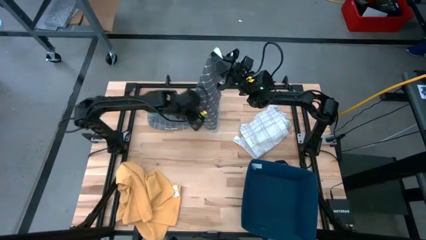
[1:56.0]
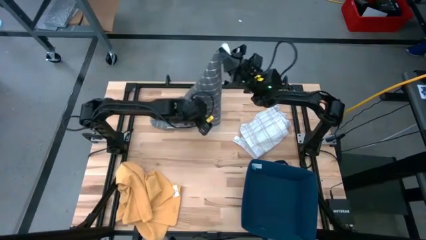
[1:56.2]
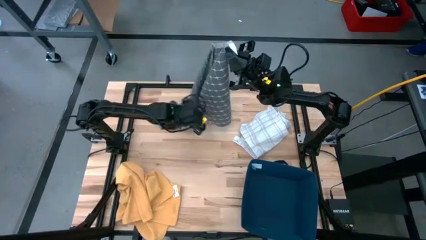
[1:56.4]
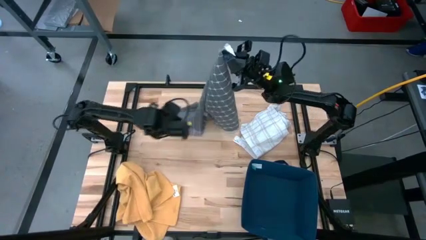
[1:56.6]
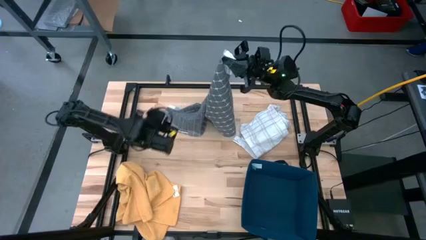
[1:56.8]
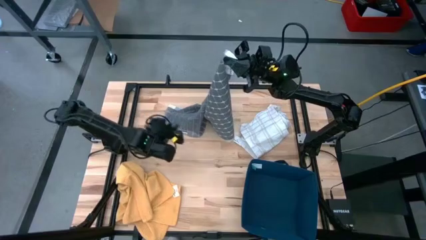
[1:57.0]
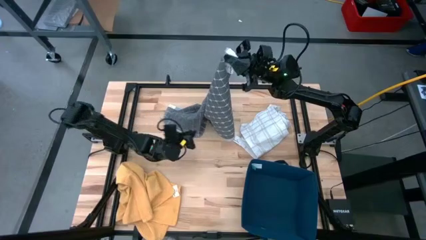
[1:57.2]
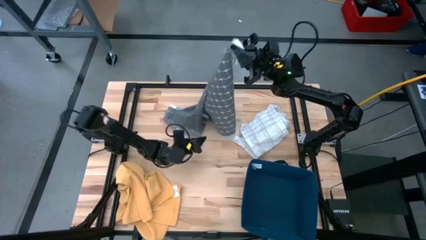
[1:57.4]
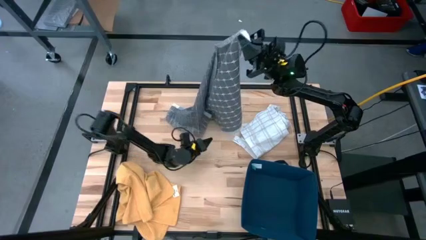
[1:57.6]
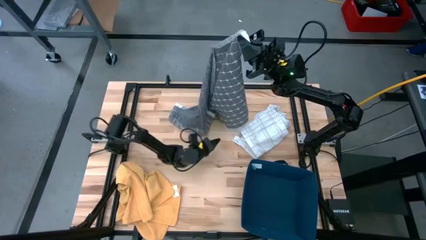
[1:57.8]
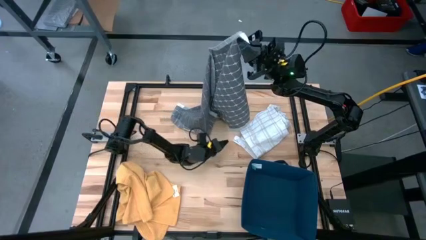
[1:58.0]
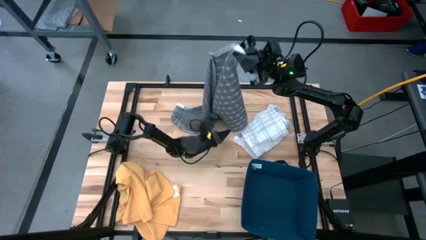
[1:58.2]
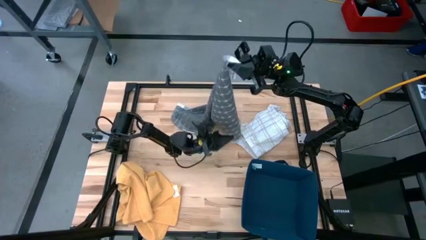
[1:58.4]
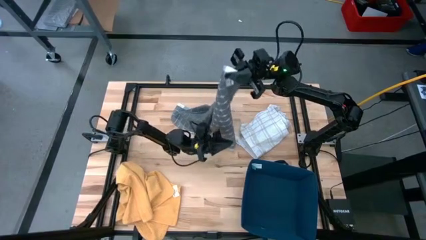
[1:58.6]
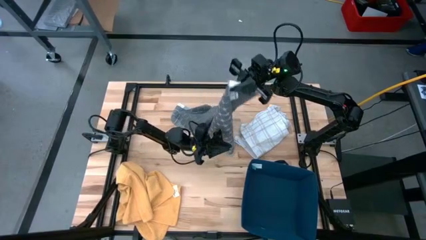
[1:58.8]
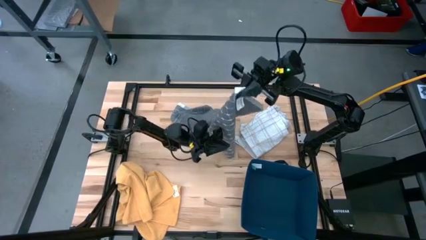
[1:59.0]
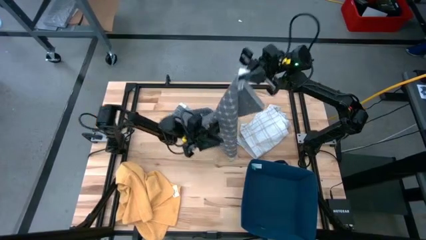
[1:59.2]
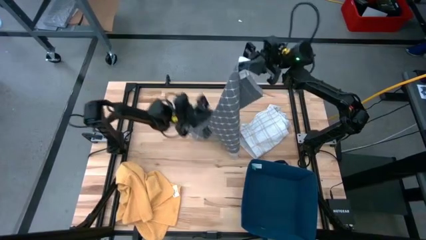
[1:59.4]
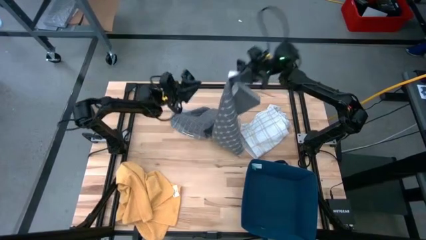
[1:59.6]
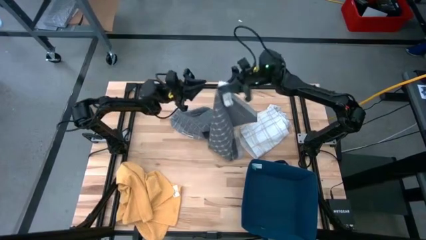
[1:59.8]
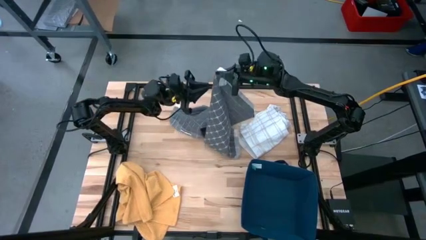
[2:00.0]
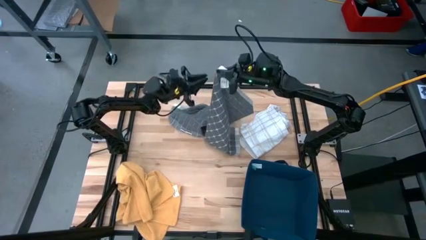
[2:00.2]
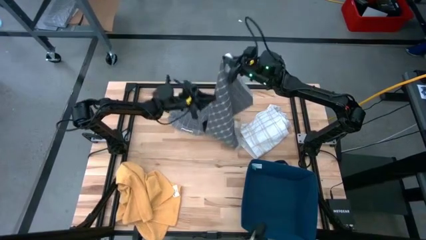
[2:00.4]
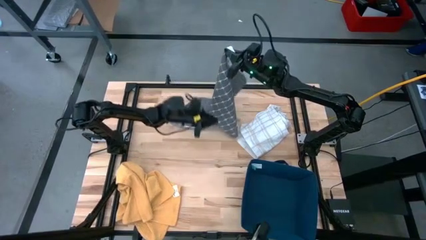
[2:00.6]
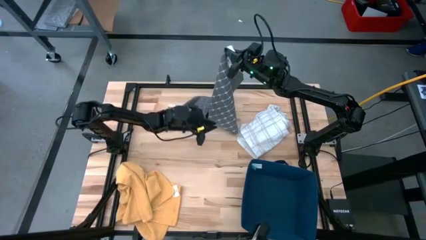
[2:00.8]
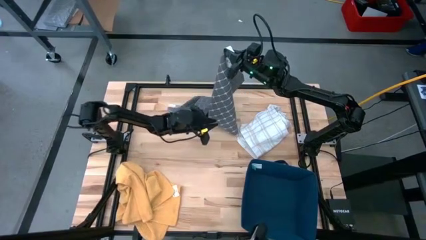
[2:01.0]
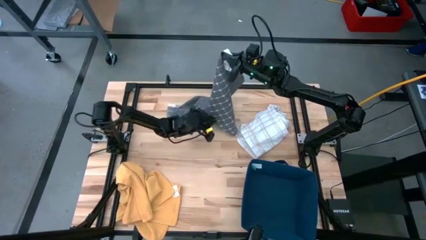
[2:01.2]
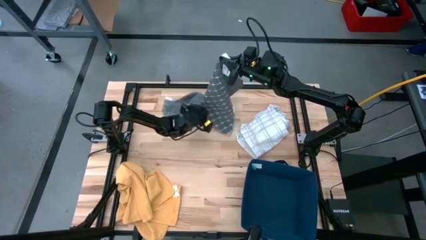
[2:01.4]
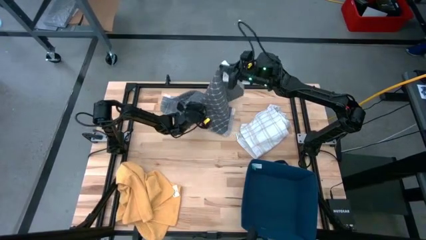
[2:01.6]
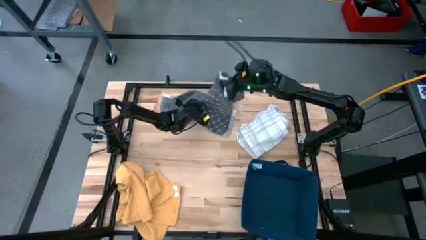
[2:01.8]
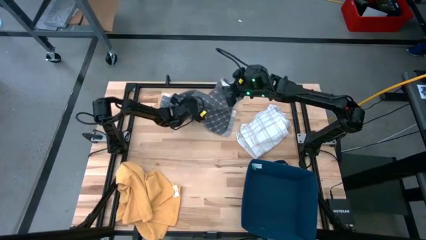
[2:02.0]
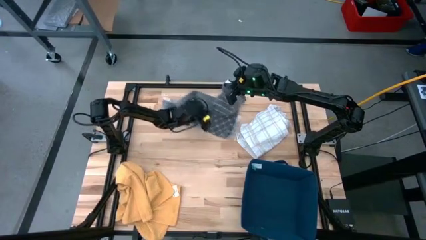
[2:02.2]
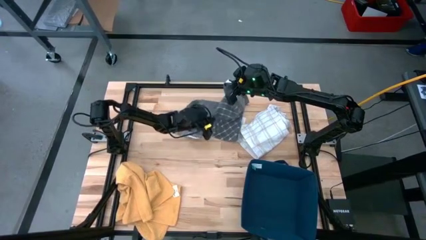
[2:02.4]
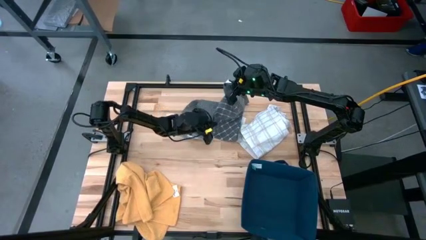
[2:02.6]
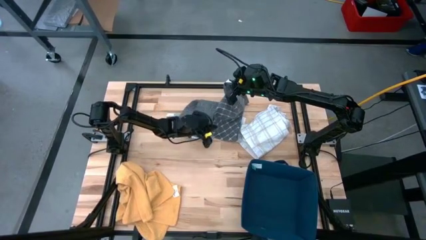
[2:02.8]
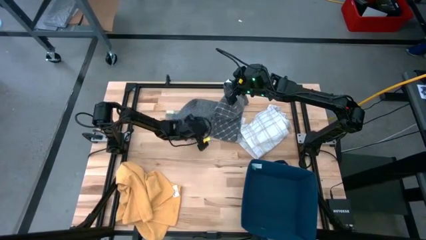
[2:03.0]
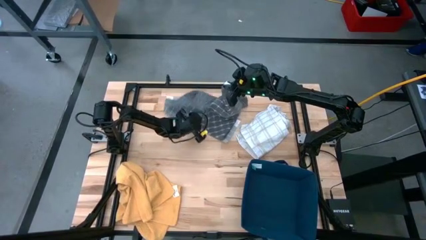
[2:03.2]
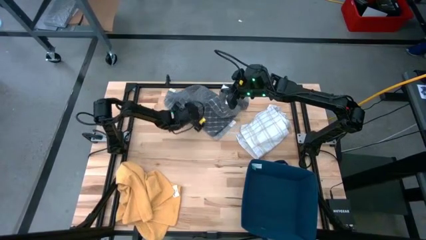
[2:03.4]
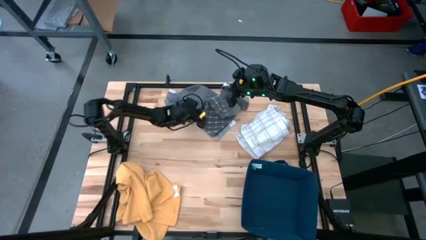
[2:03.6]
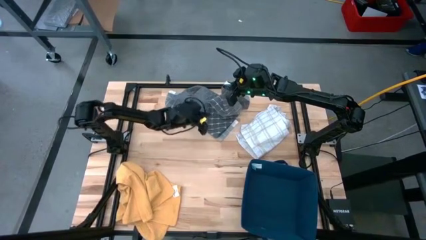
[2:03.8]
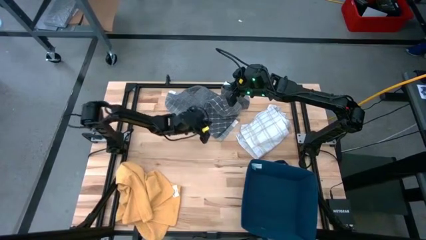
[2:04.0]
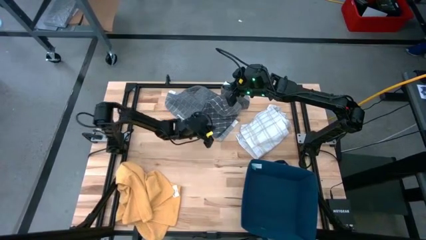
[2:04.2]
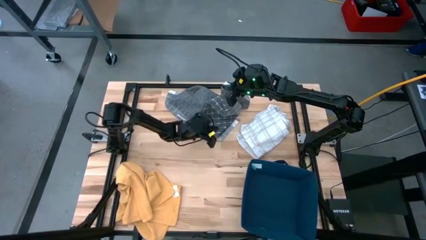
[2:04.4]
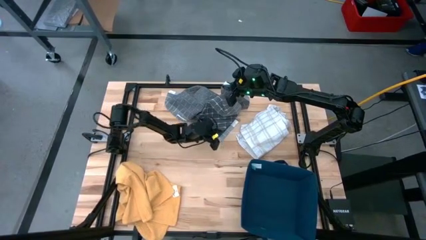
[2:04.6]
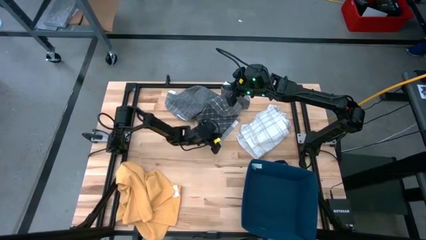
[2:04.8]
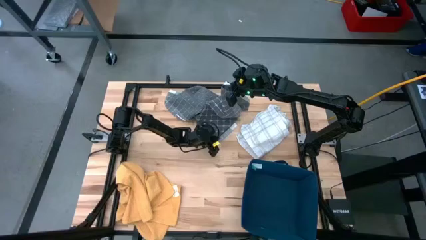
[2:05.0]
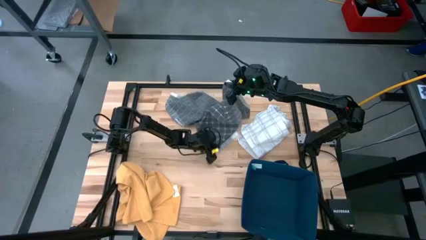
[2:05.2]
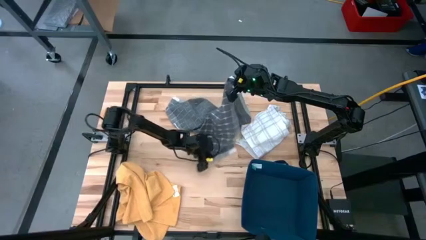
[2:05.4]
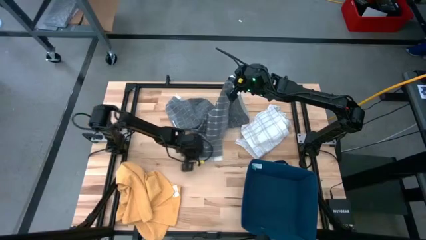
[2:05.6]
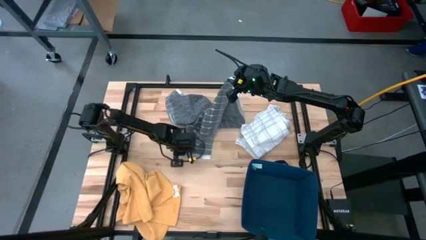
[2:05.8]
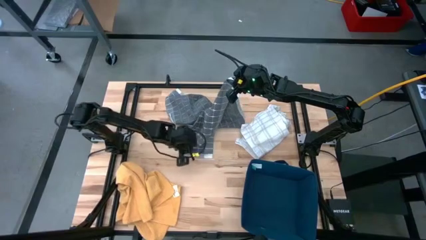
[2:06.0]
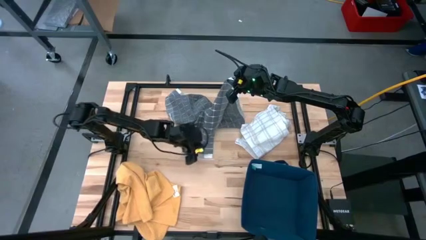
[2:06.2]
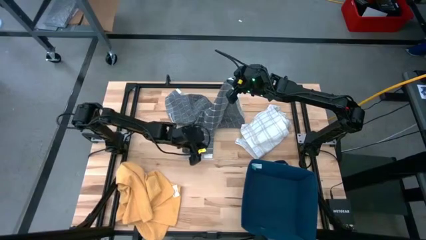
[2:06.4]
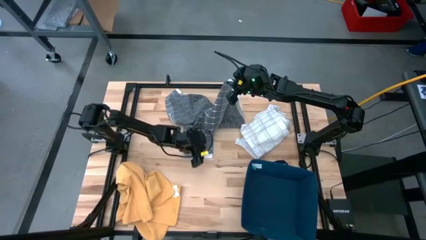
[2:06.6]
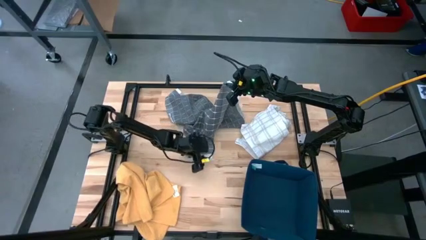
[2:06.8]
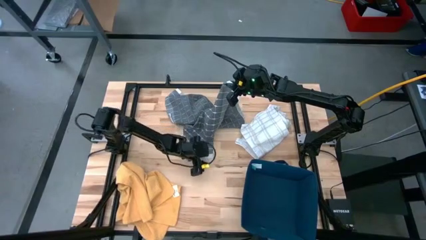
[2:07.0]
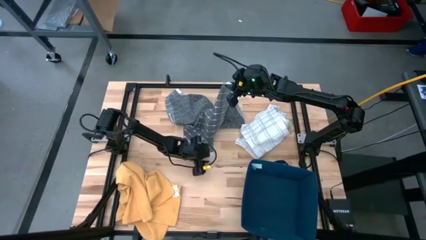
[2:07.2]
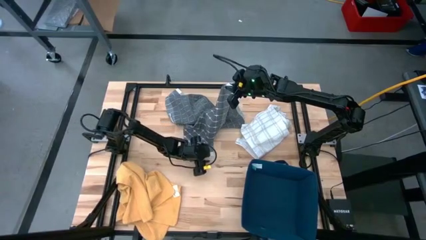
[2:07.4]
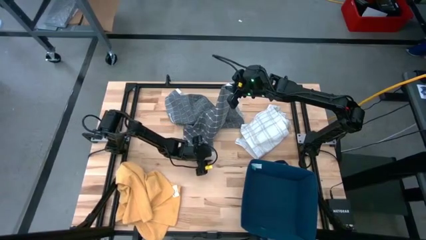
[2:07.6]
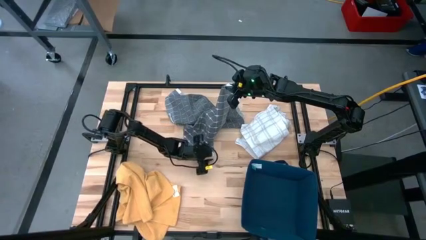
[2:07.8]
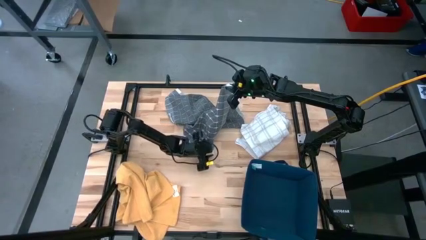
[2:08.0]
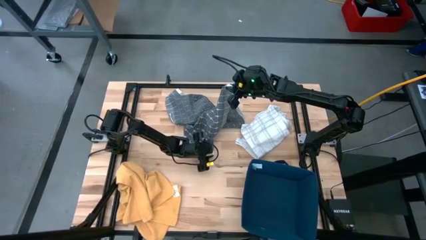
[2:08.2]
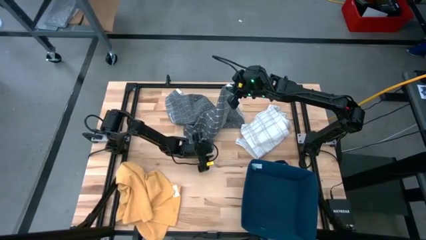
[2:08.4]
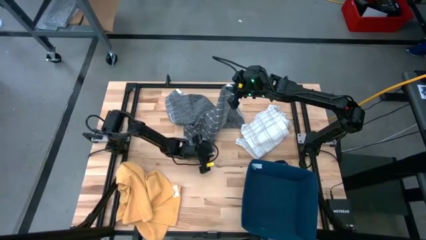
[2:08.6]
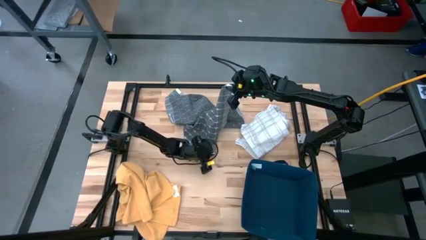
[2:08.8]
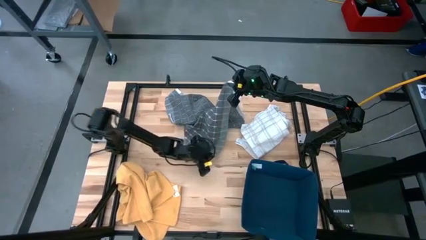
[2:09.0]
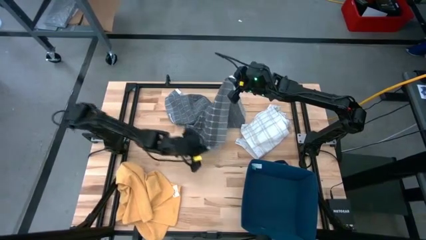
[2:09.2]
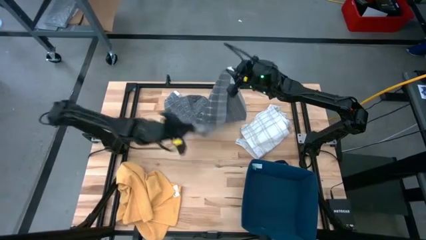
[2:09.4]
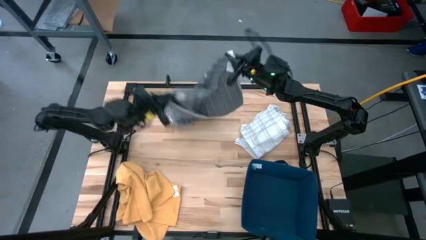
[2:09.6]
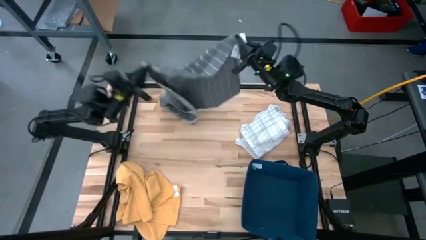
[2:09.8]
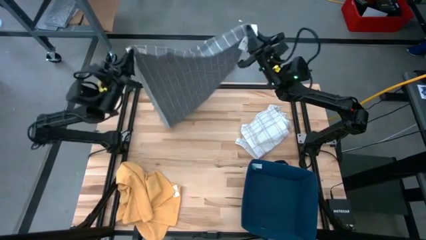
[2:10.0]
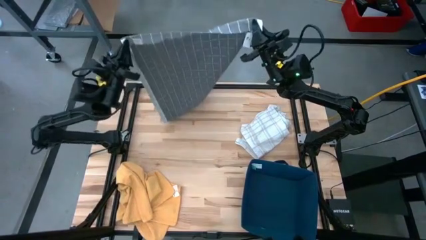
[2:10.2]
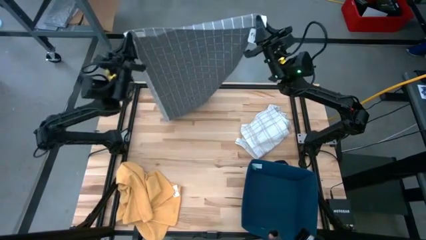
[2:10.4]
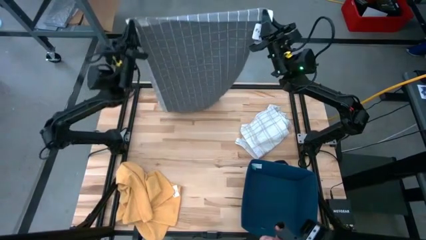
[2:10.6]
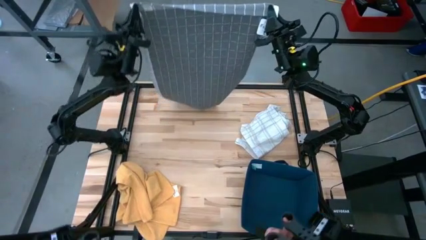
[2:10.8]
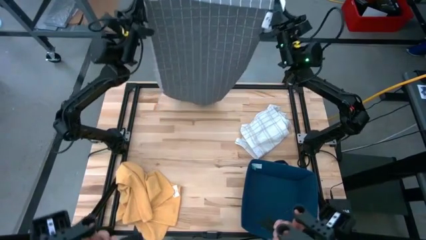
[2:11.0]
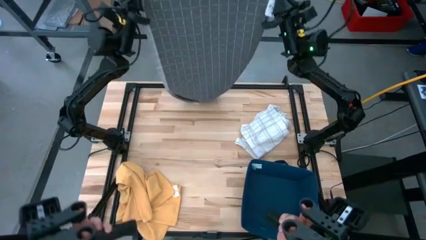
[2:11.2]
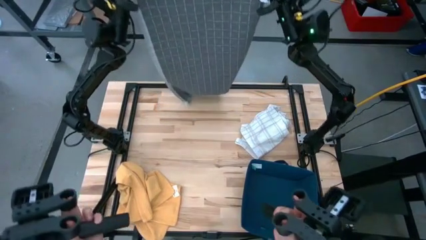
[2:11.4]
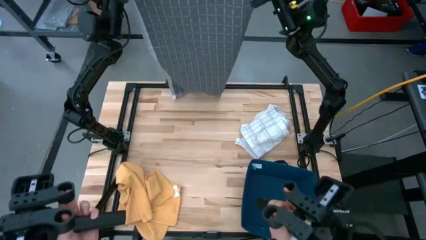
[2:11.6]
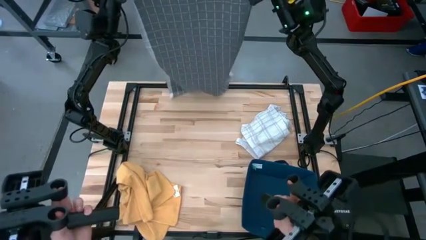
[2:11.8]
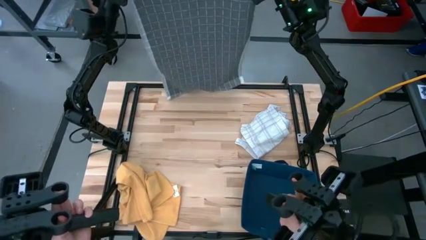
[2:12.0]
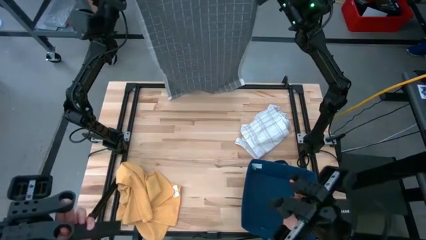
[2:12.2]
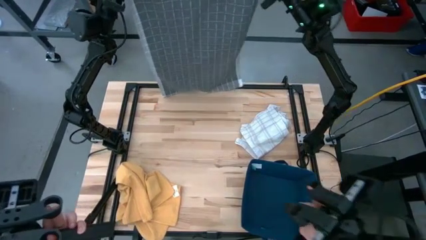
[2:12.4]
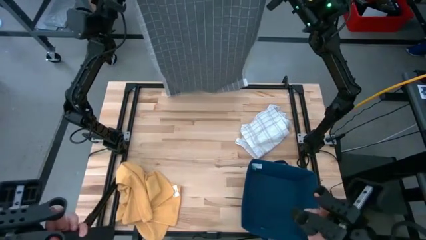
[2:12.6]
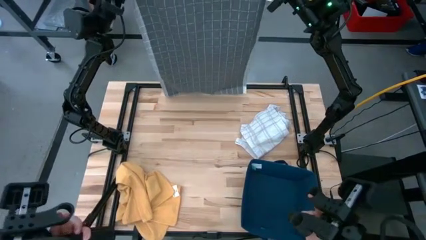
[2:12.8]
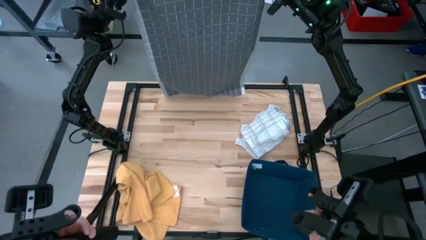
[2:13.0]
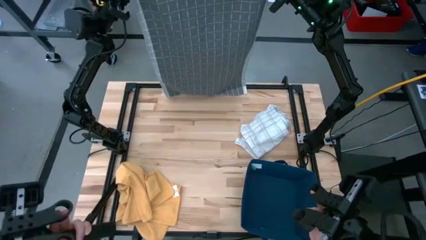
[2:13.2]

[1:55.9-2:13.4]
Task: Fold towel
Fold the gray kitchen towel
